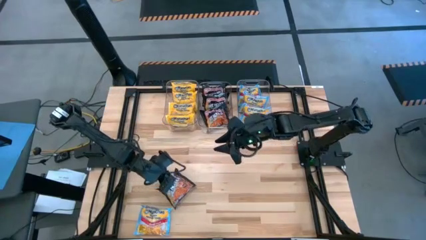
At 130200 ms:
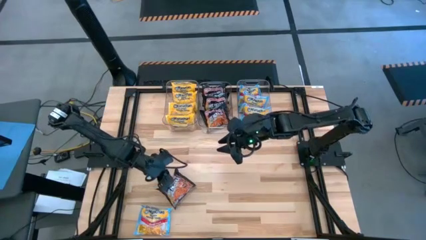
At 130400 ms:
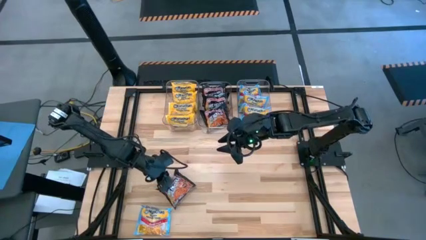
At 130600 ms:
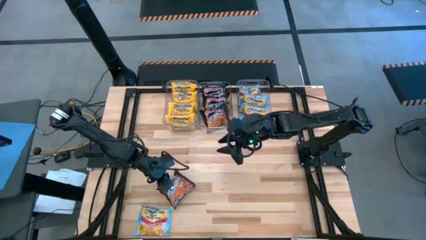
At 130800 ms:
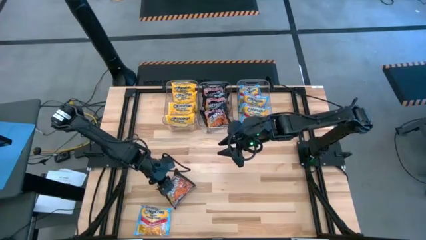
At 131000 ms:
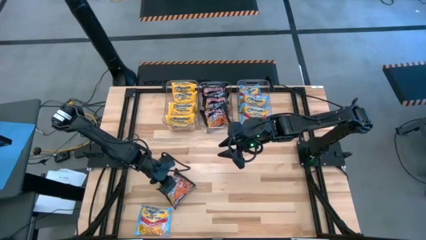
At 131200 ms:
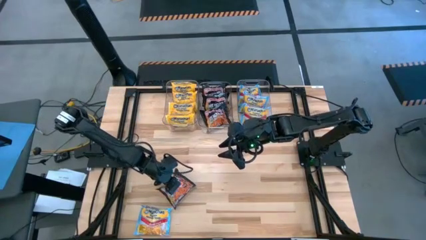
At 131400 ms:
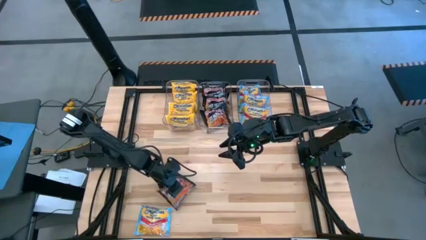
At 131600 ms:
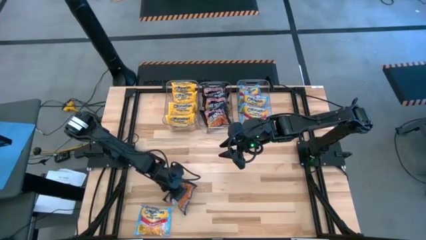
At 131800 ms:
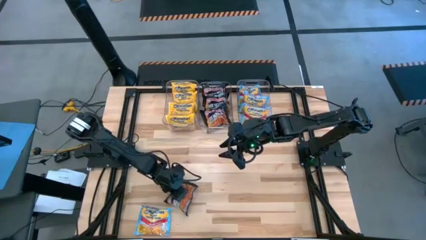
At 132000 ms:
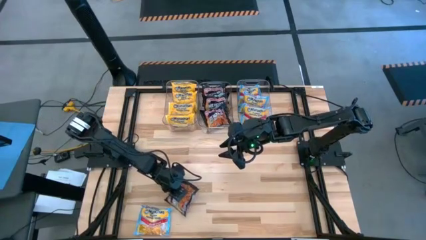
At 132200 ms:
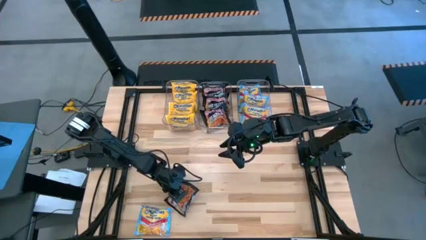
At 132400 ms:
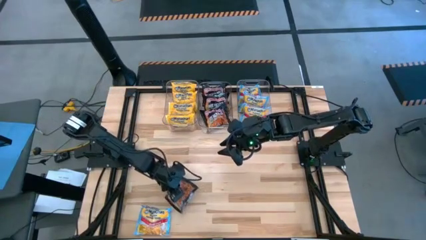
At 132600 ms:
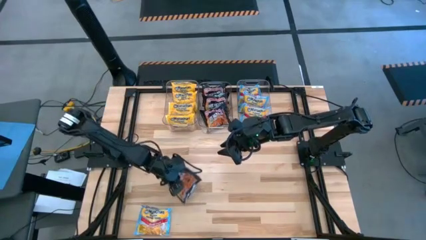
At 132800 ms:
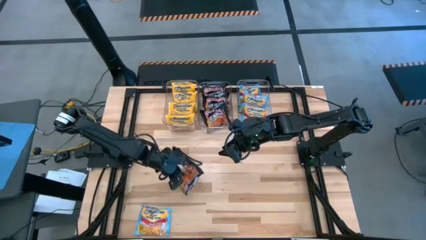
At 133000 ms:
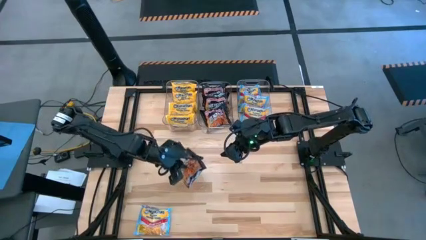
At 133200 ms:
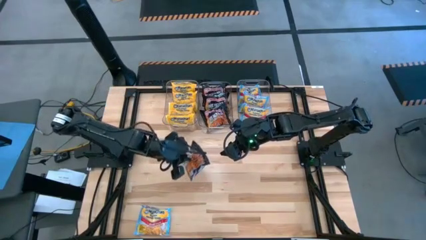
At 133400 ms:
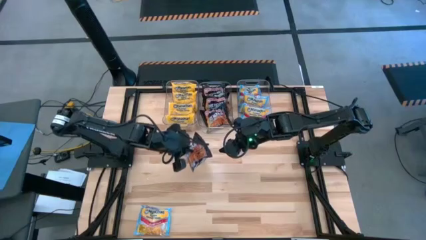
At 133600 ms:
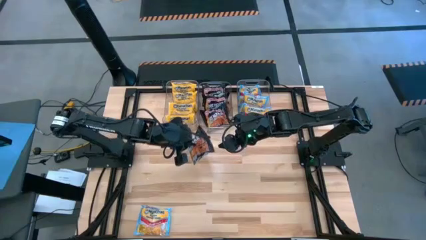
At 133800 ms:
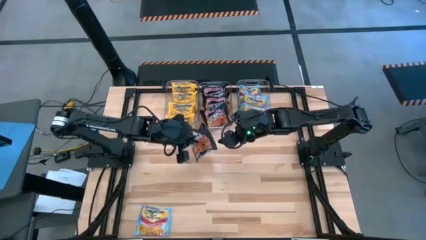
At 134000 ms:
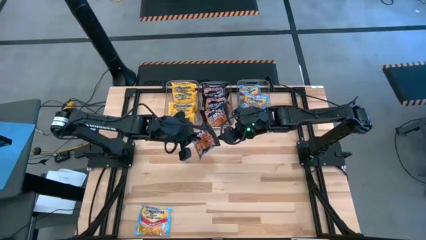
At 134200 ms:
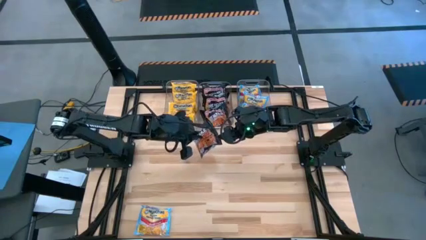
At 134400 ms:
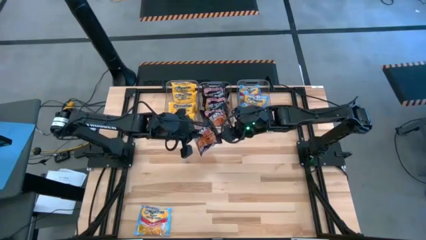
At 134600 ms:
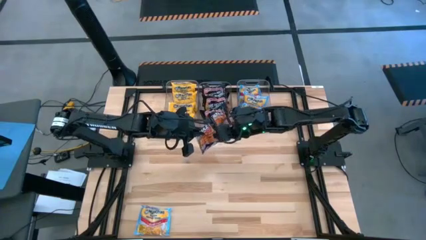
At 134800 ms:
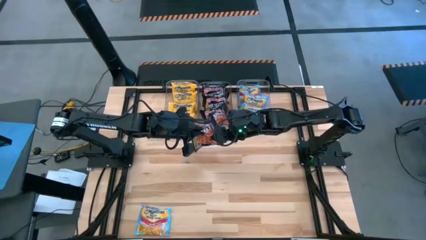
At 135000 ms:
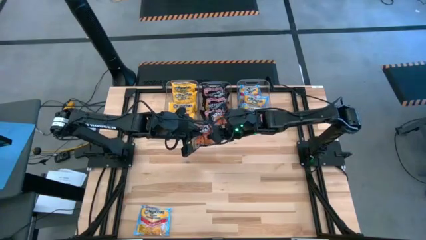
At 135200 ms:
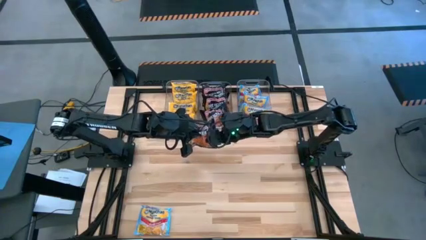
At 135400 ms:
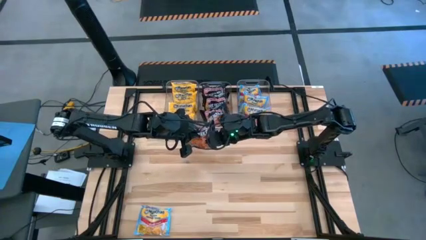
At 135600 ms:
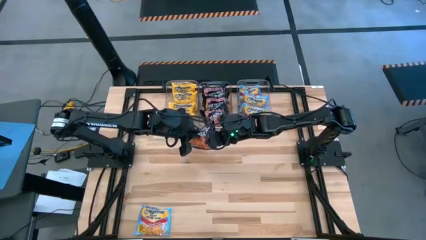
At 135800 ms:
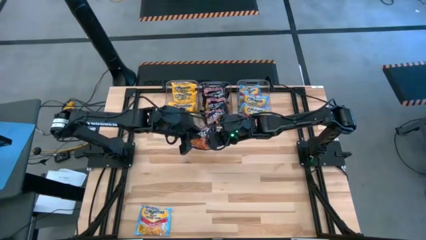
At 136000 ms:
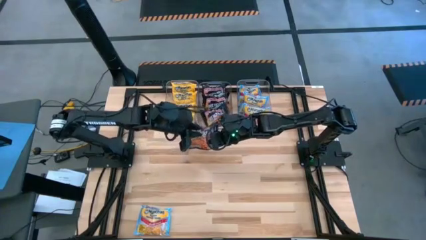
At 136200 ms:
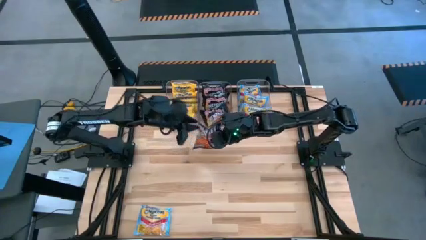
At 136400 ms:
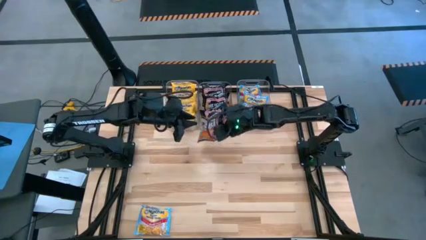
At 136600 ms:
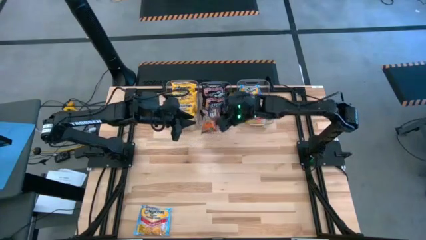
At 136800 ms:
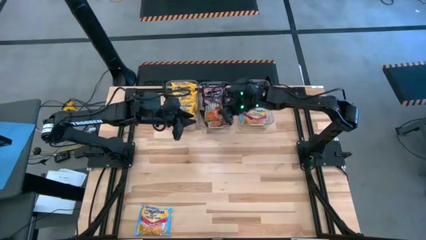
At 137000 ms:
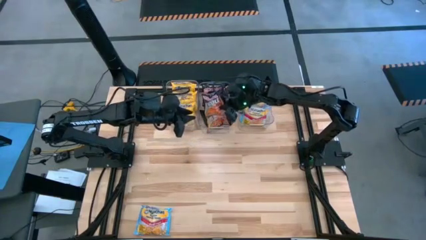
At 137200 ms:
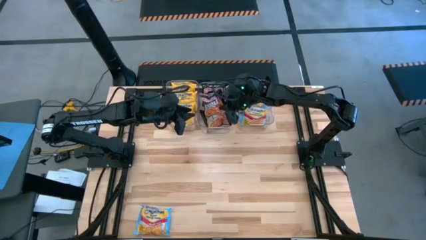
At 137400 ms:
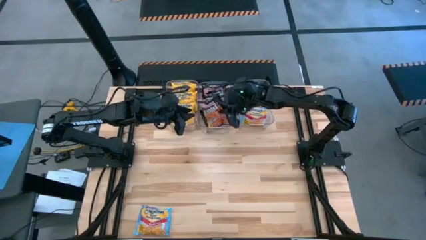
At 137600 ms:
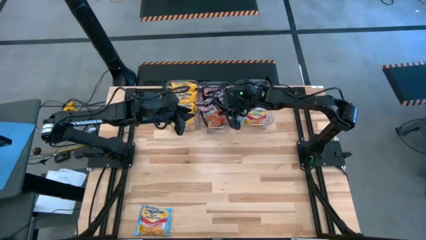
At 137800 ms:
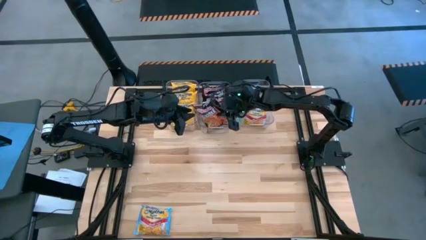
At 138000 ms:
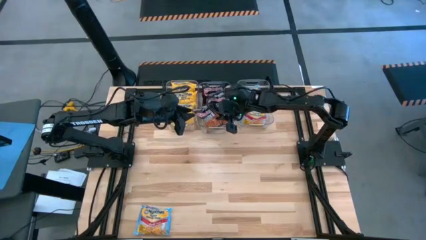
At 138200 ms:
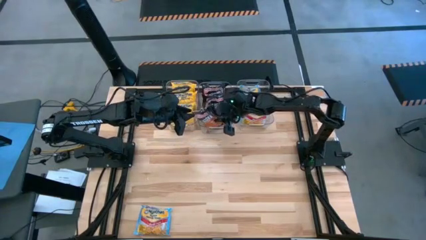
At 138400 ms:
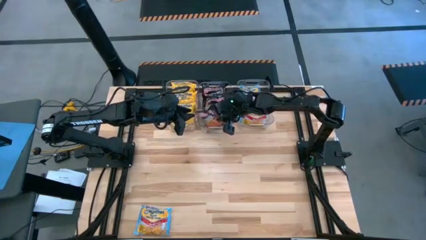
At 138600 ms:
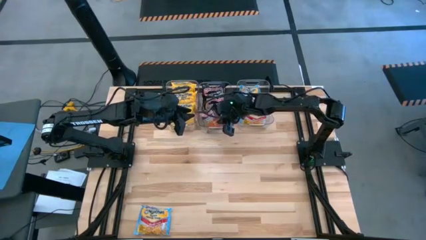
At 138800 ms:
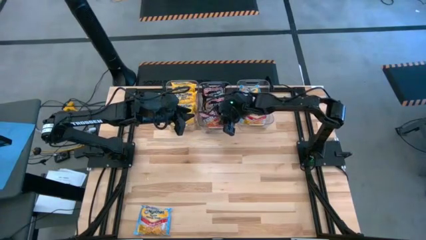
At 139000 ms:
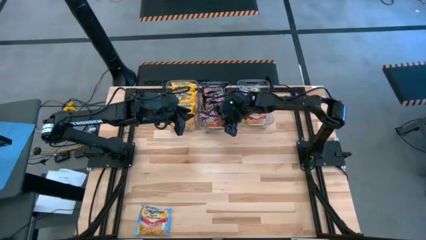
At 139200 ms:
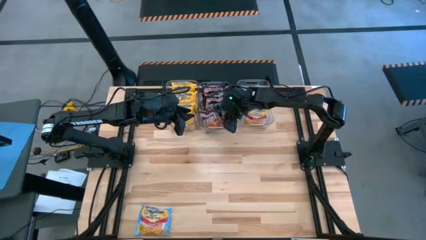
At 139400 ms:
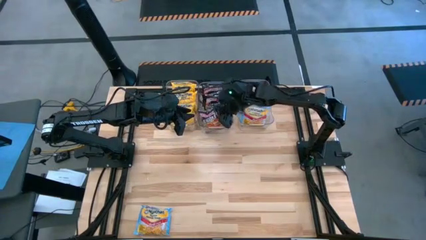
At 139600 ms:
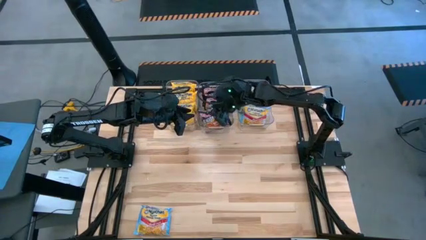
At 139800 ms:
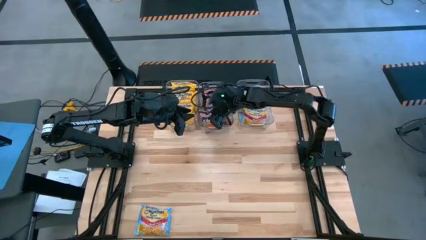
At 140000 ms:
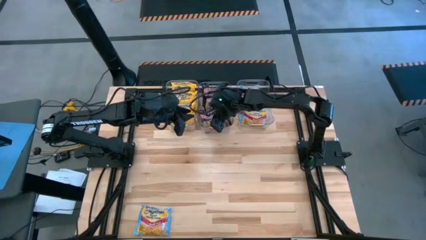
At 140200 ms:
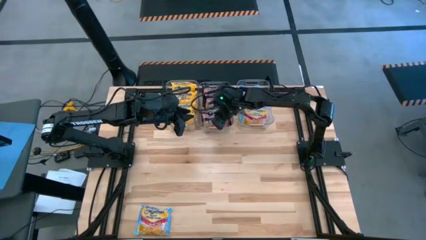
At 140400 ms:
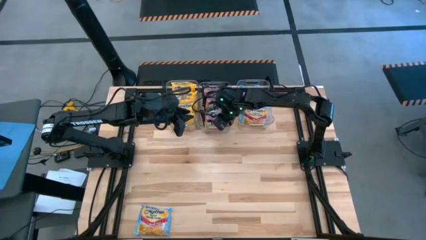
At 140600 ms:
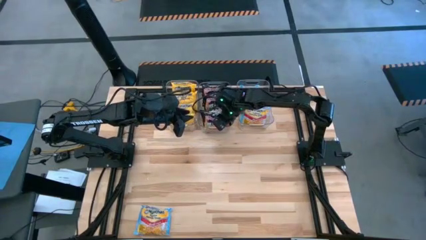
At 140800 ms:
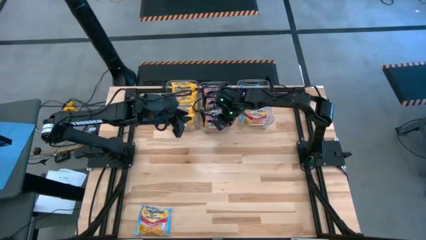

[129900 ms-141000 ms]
Task: Sort Maruchan noodles
Put the black noodle pack in the middle transparent bin

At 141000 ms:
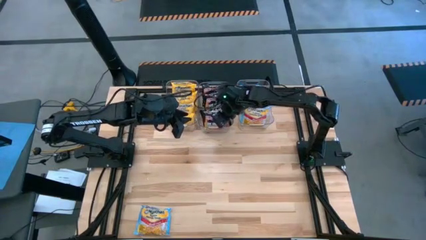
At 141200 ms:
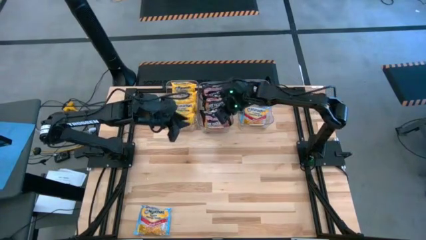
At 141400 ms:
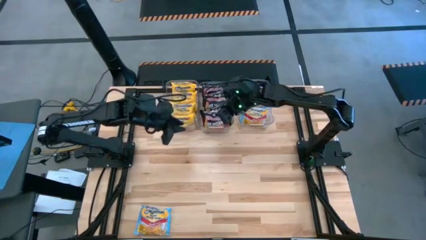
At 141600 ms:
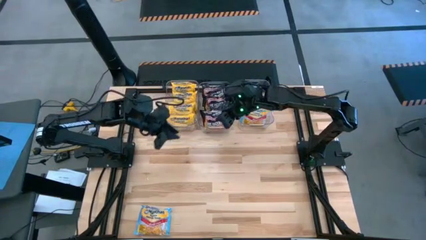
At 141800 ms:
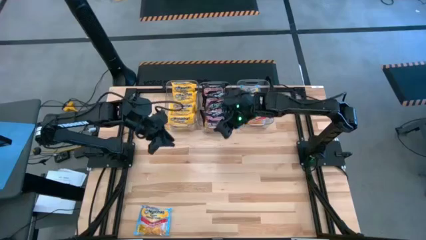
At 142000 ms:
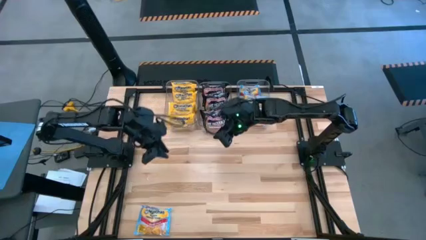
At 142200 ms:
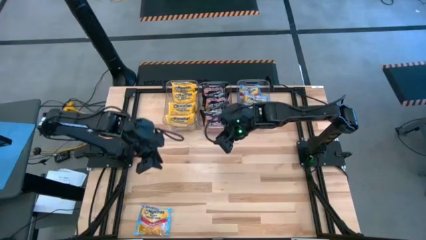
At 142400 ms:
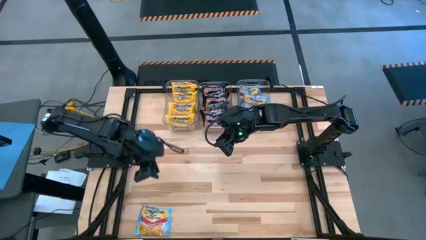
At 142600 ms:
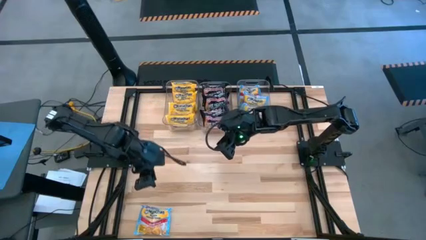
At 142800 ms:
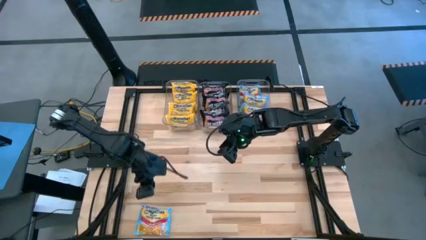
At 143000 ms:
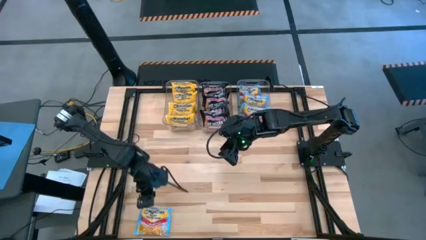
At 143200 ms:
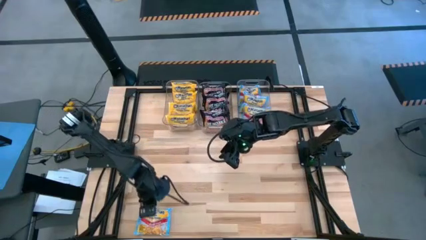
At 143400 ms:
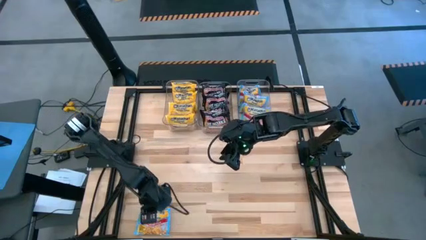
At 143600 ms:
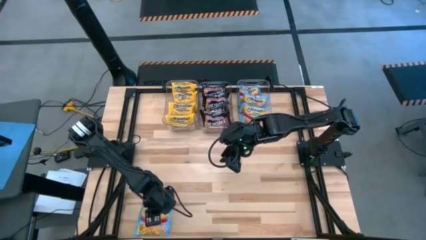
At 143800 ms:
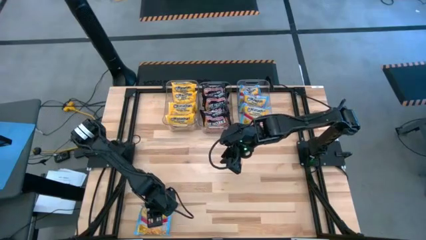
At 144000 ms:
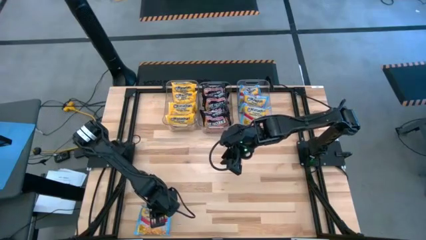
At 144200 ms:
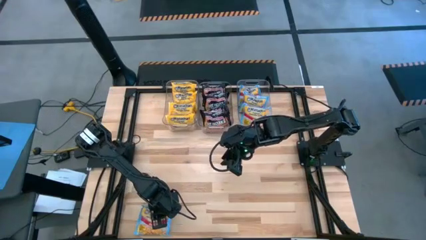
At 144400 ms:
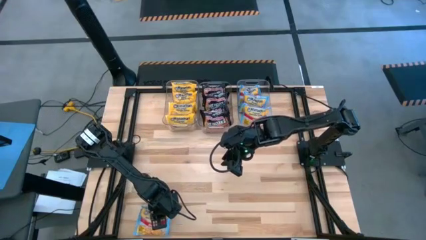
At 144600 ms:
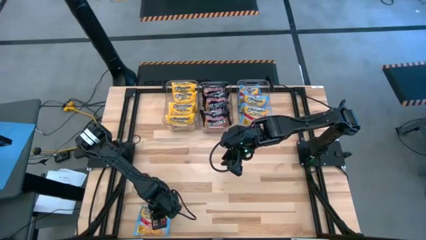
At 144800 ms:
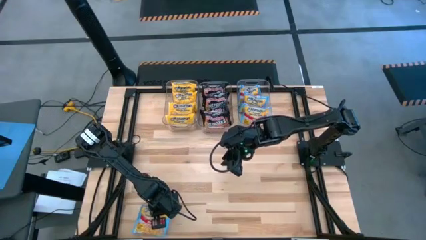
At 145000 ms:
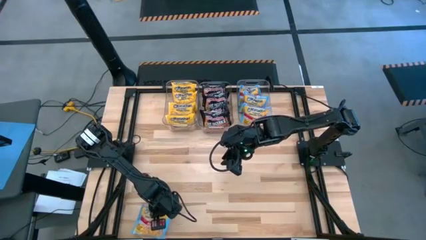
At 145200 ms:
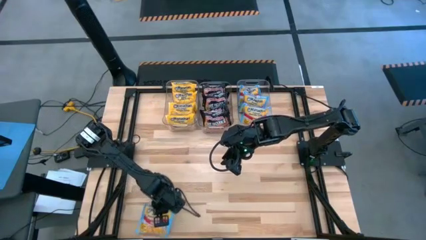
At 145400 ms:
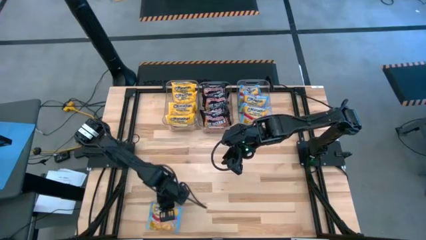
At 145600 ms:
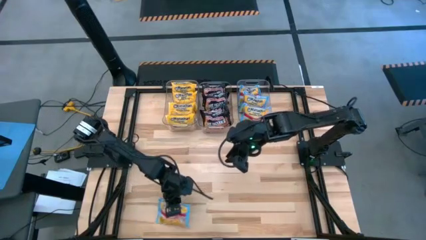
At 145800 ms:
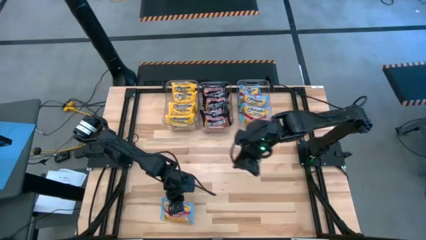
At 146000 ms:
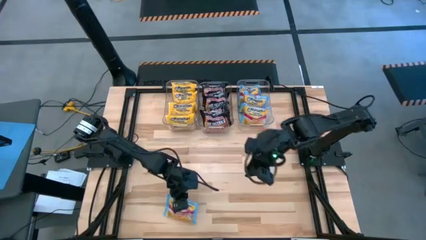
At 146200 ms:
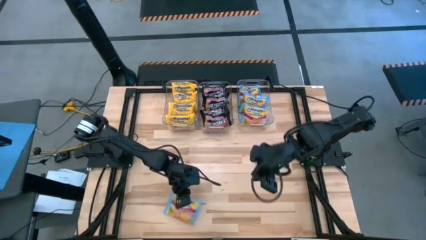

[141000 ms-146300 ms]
Put the blue noodle pack in the right transparent bin
